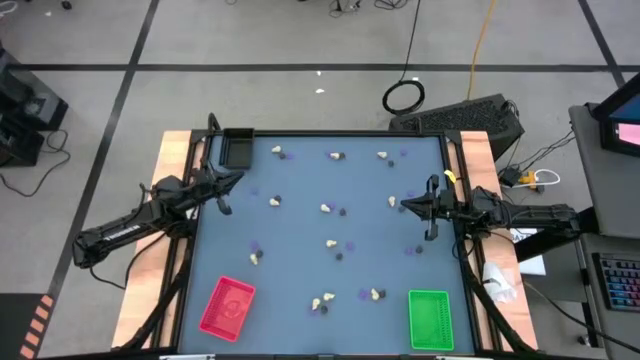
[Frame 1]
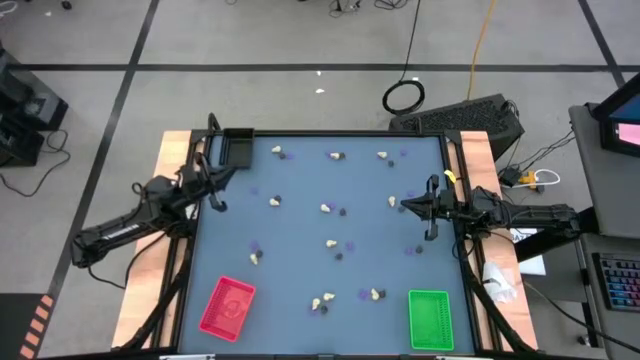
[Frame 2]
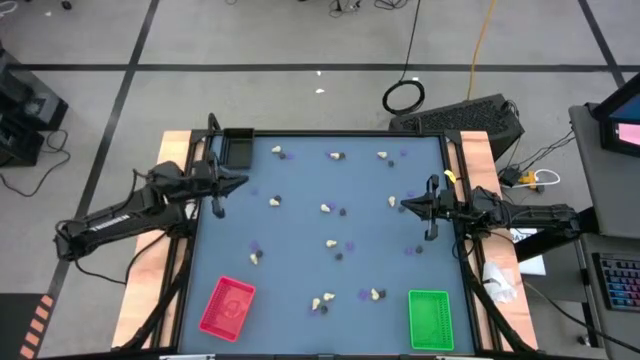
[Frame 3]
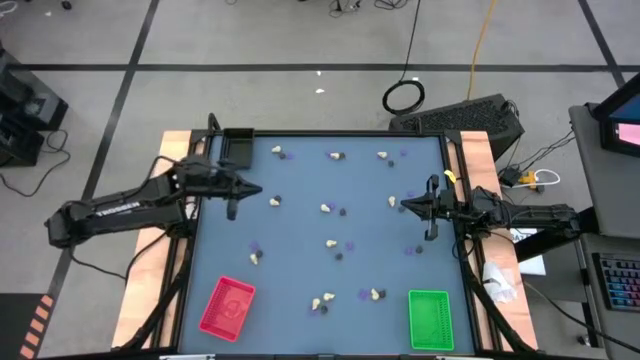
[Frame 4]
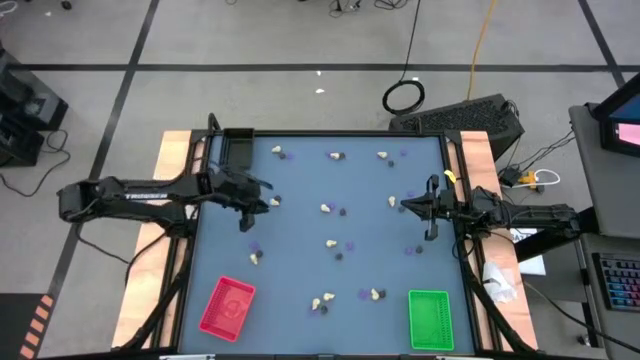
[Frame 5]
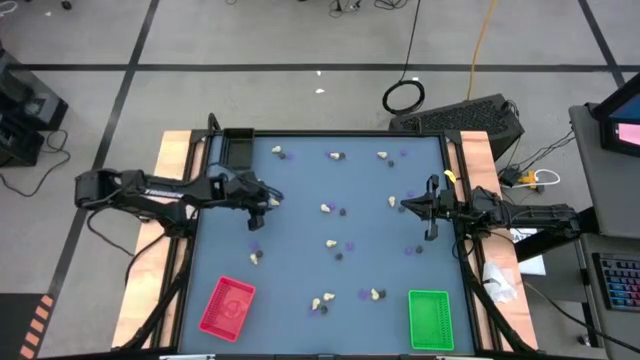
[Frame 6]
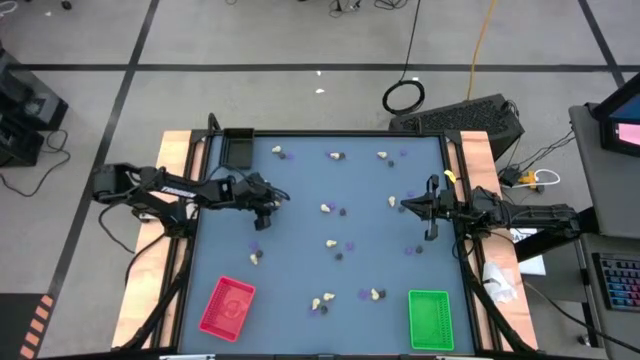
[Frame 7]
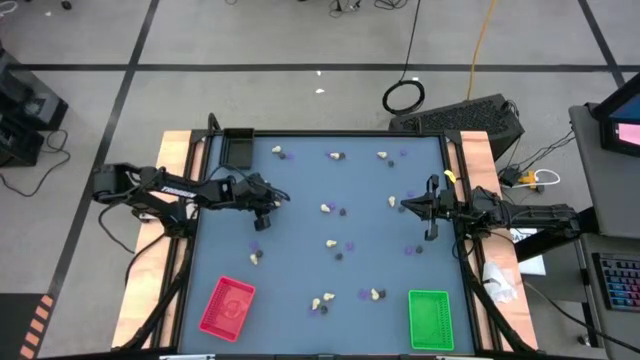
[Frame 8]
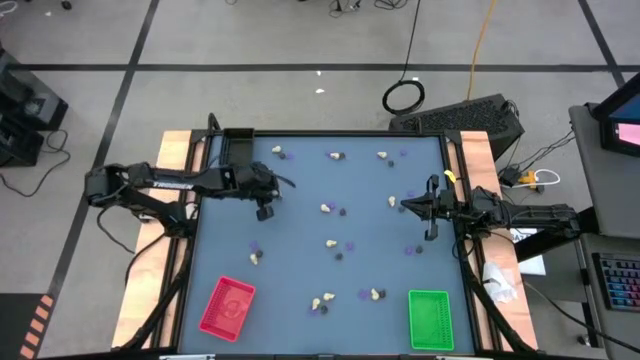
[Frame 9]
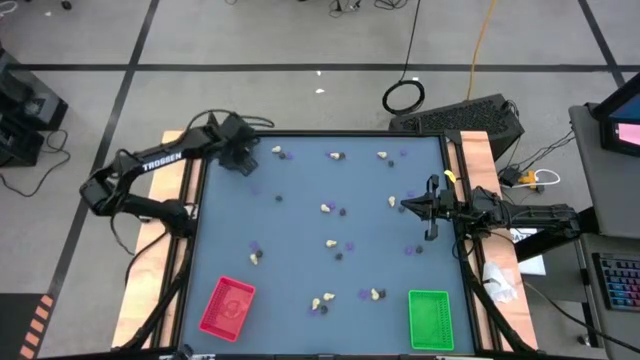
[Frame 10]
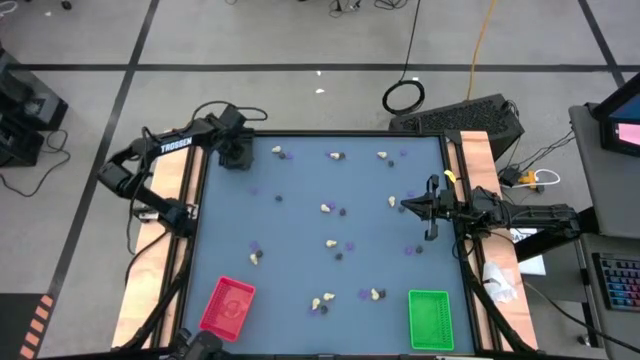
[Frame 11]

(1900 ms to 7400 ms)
Task: Sort Halloween decoration
Put the white skull toy into the black bin

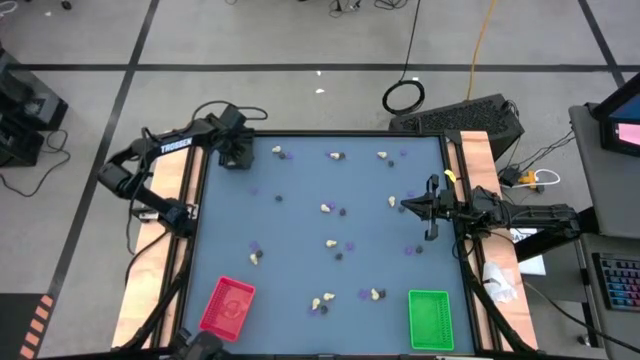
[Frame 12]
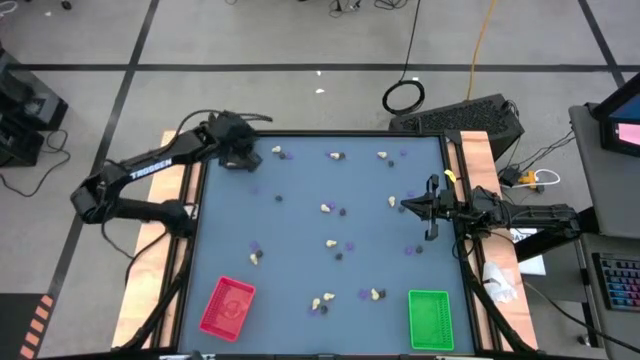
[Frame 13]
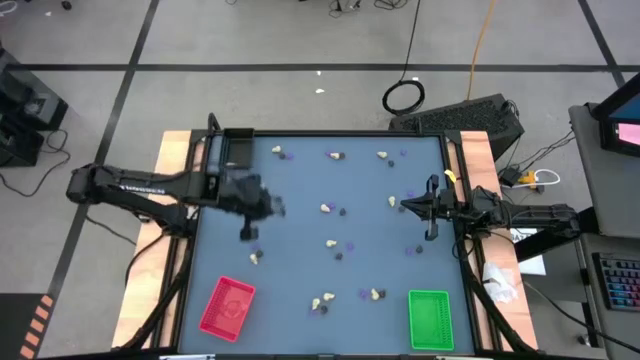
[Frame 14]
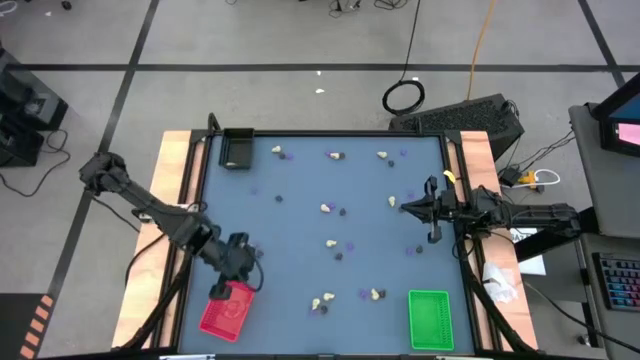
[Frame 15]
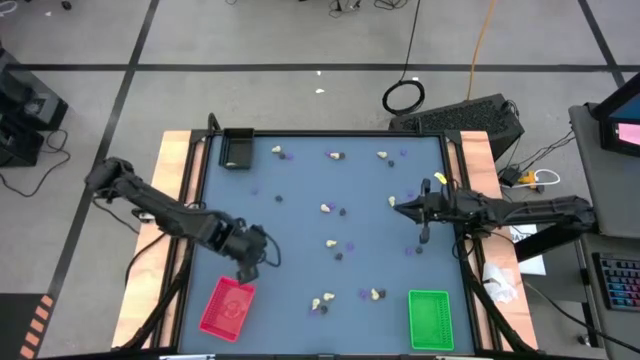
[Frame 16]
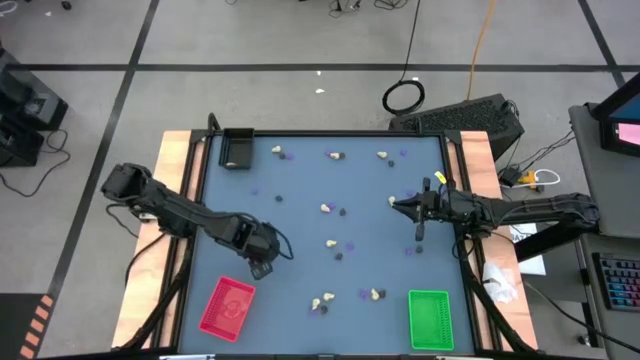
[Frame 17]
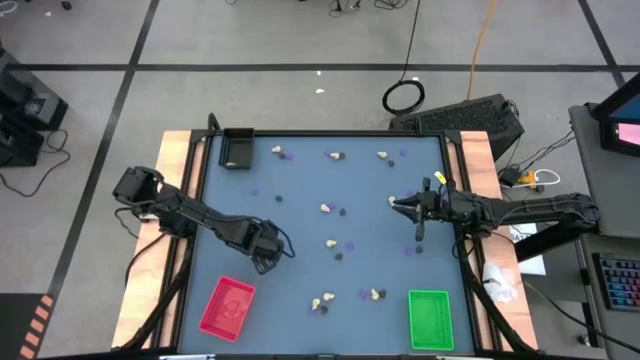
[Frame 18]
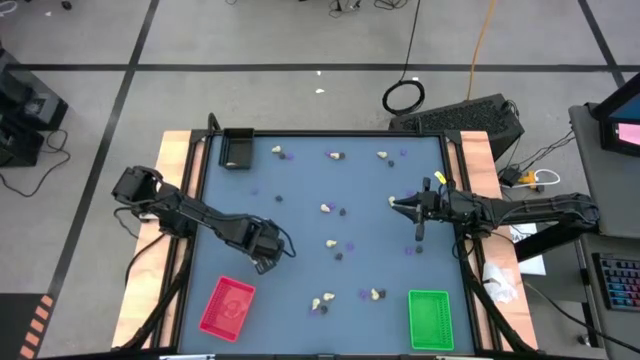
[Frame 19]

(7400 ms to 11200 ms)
Put the black skull toy into the red bin

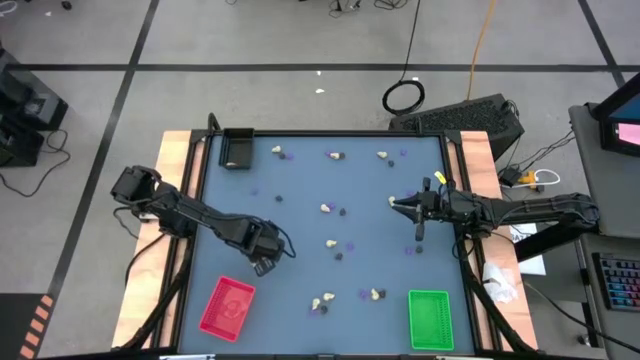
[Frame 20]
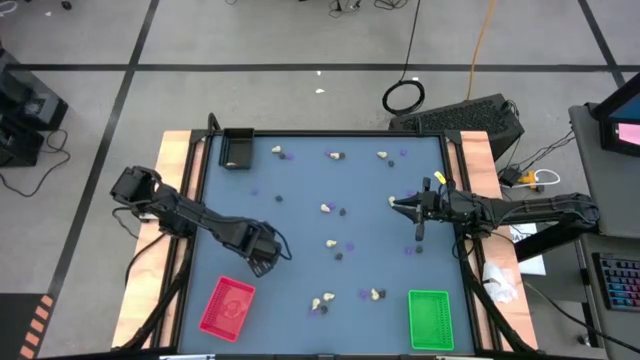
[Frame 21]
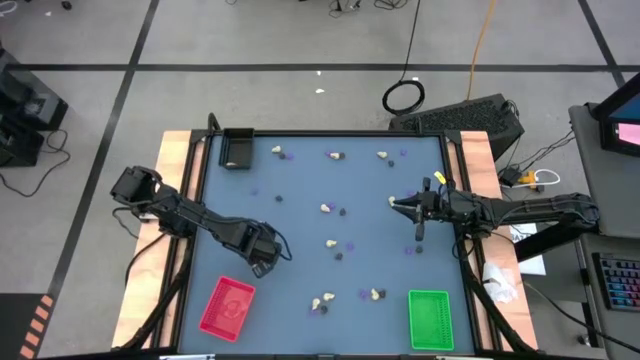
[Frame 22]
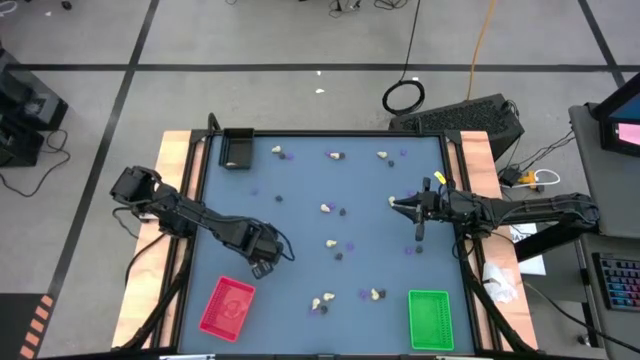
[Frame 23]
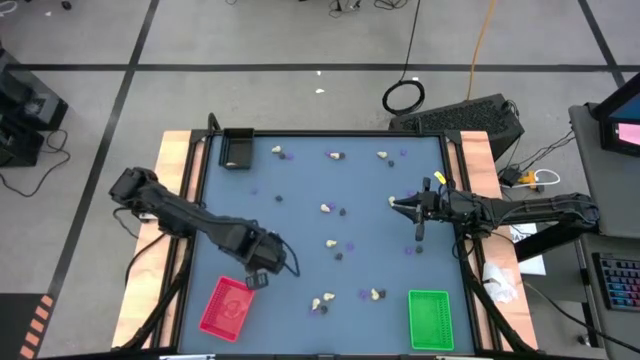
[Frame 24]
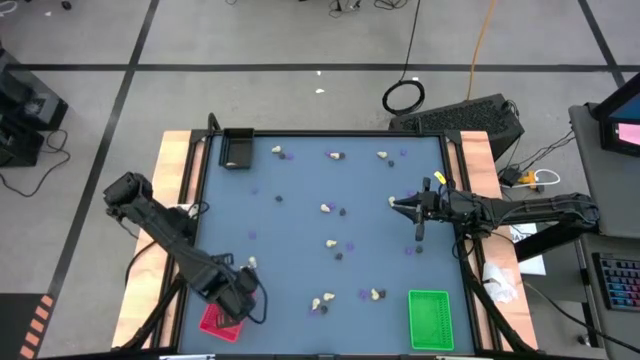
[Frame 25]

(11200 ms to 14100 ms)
Put the black skull toy into the red bin

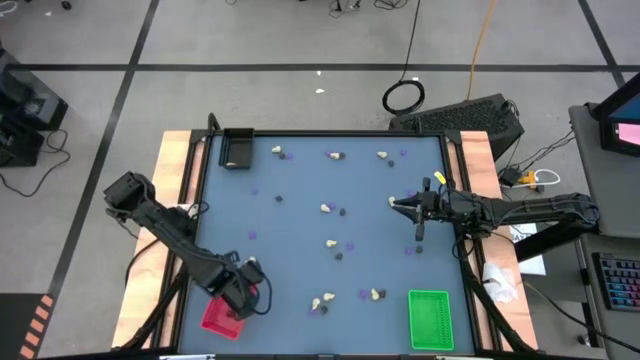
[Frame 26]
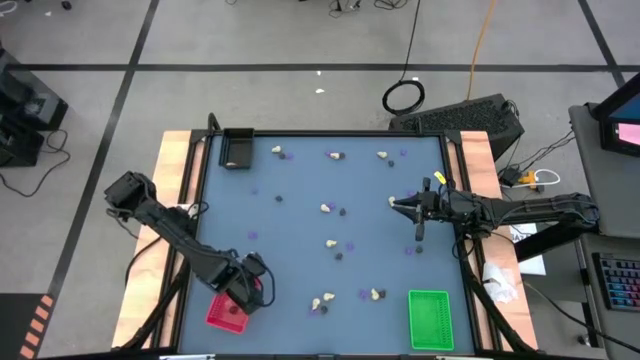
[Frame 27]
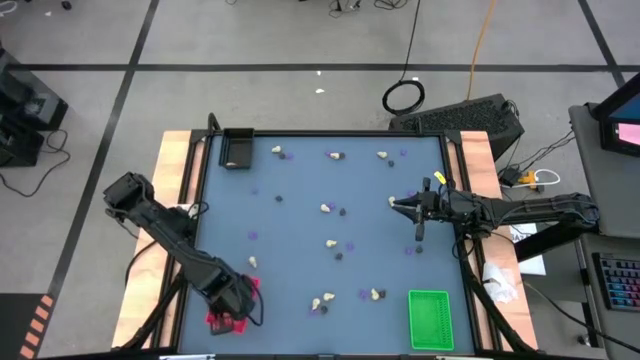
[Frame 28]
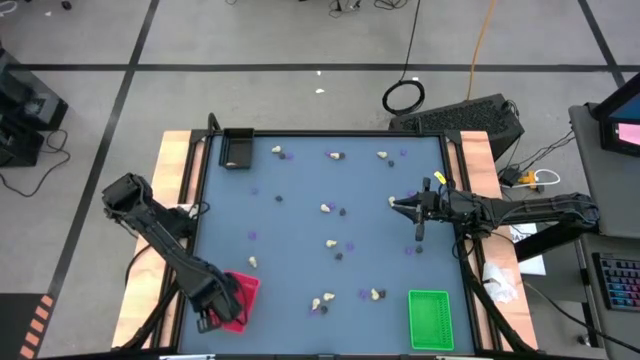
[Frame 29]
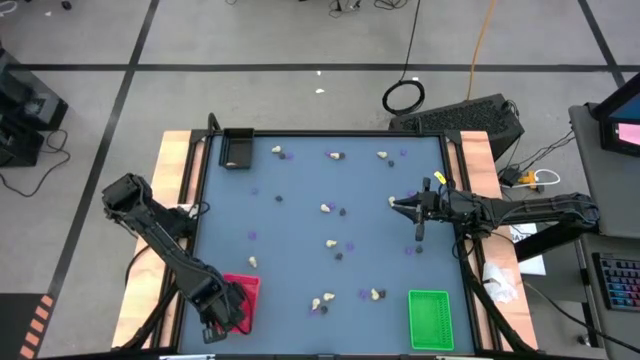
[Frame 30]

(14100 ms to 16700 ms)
Adjust the red bin

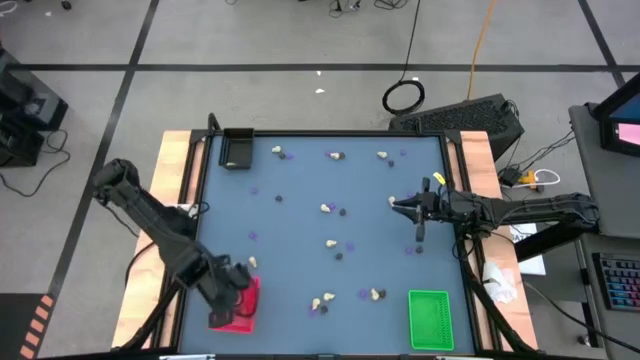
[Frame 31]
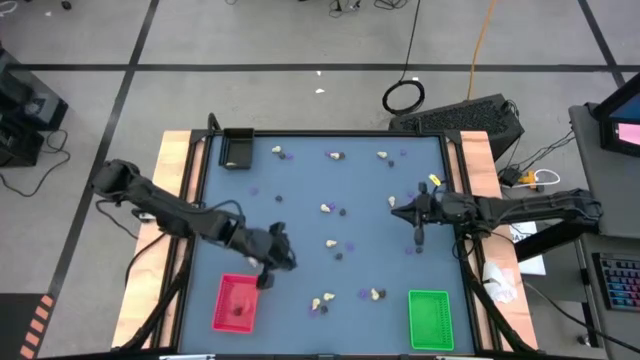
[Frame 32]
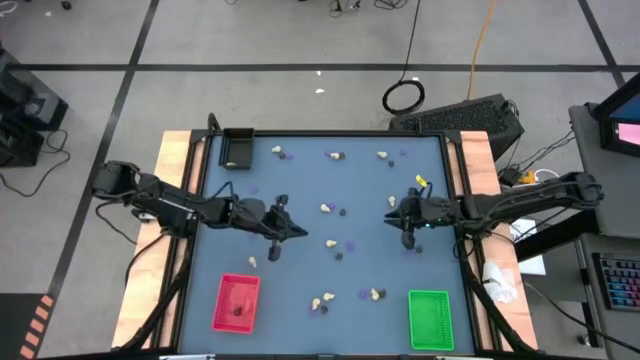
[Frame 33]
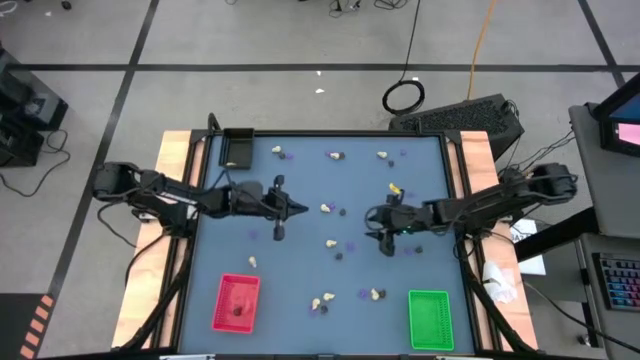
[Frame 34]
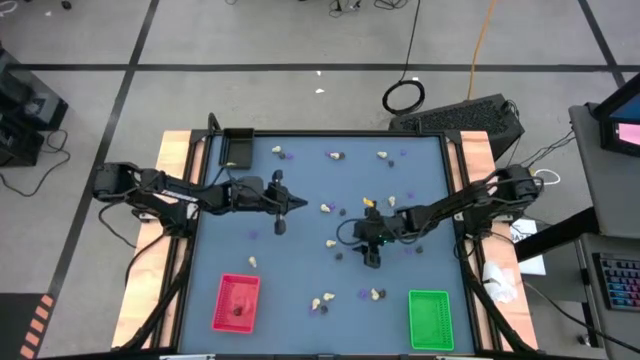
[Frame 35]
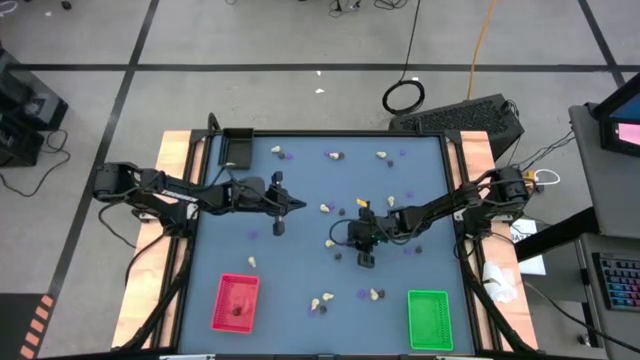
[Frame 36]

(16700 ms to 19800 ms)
Put the violet spider toy into the green bin

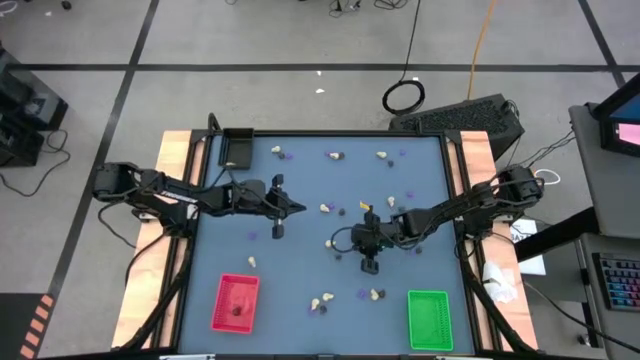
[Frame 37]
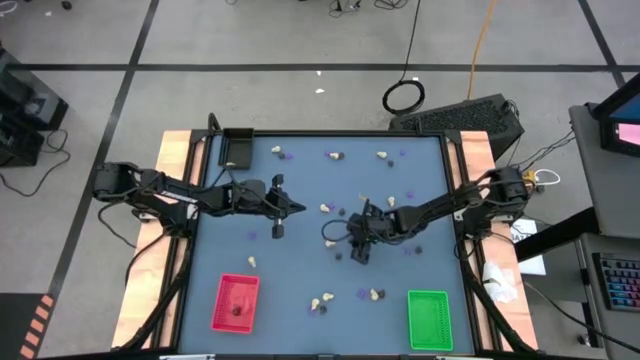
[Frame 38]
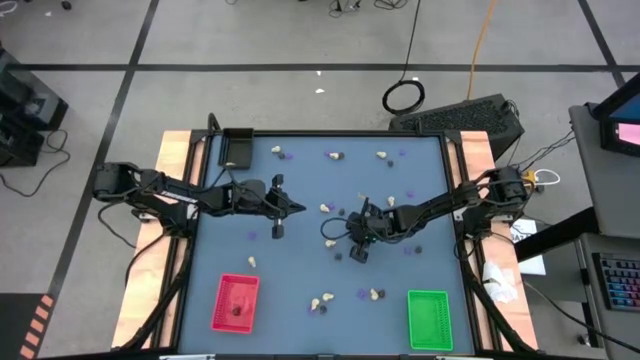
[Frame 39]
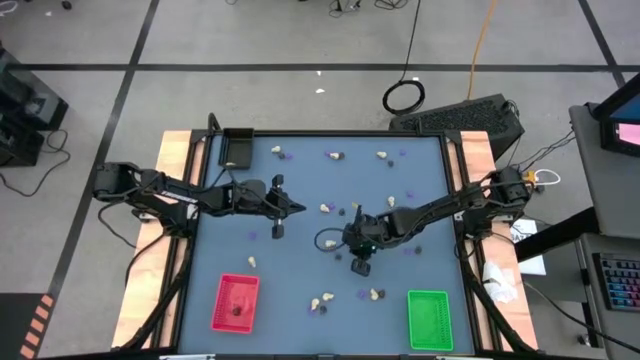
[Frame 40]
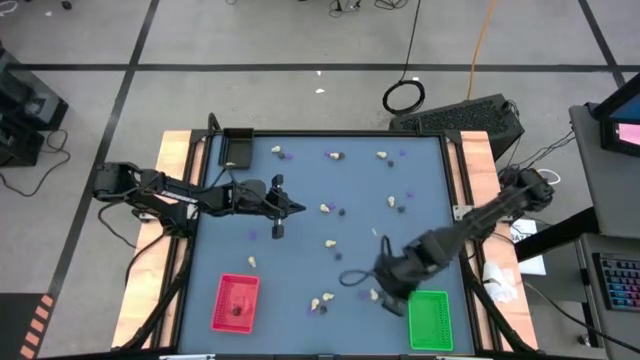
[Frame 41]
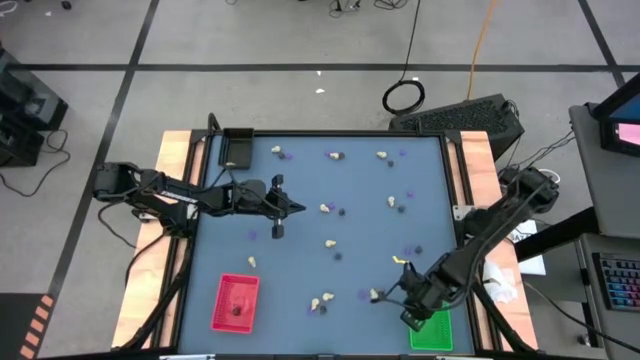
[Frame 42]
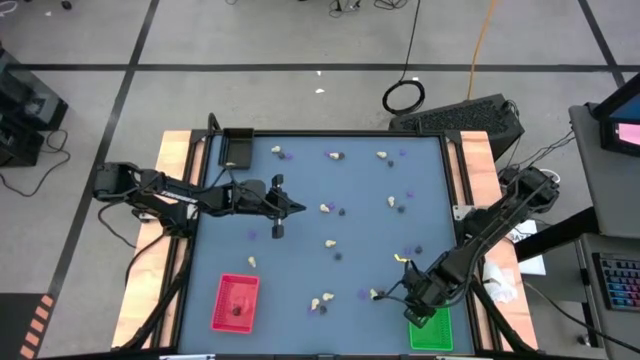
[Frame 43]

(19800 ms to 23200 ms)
Put the violet spider toy into the green bin
